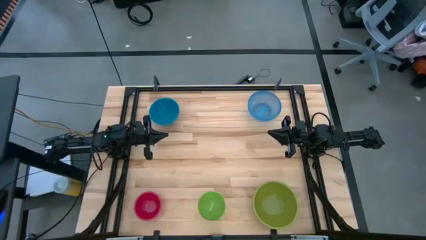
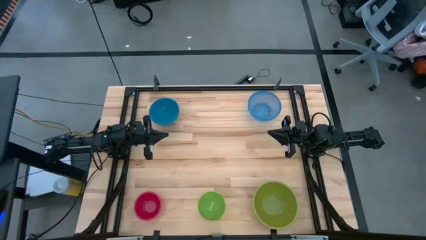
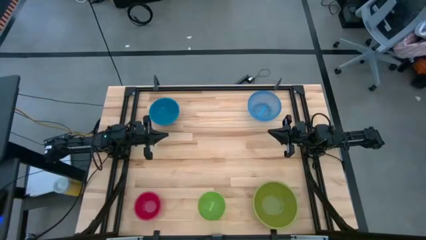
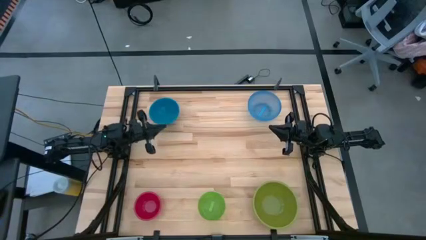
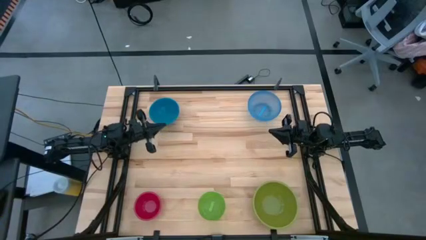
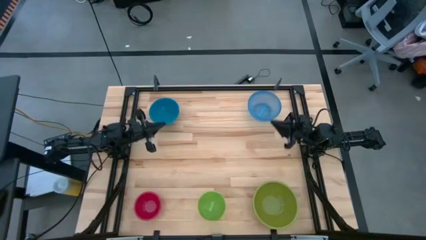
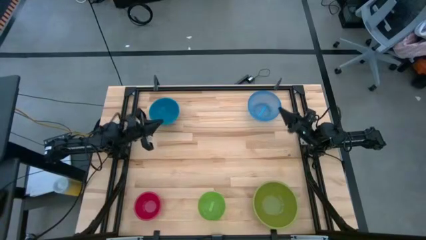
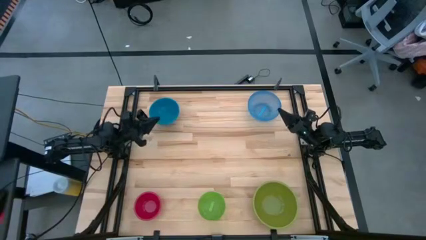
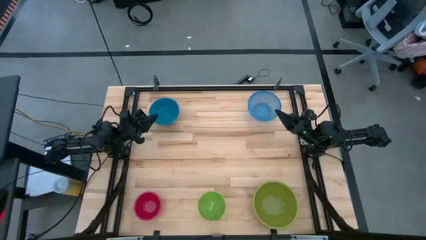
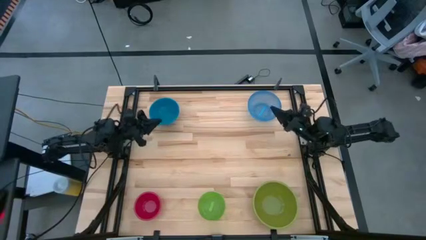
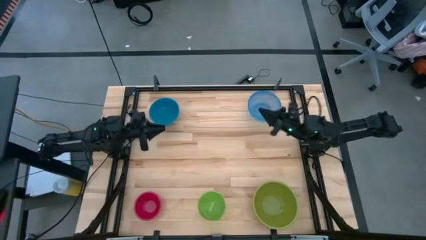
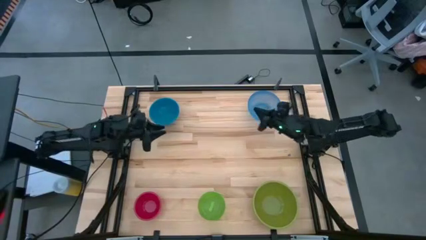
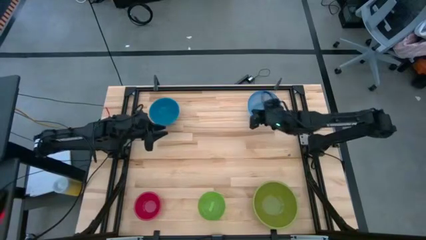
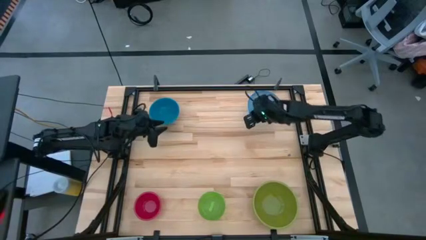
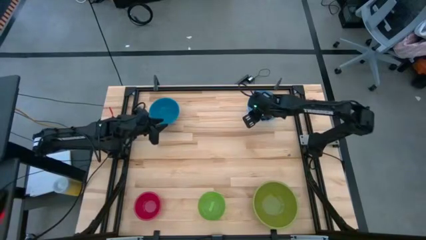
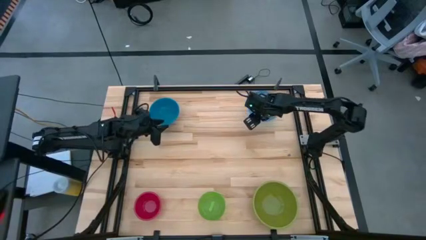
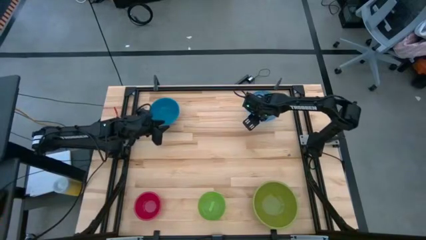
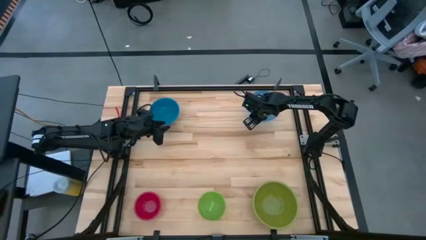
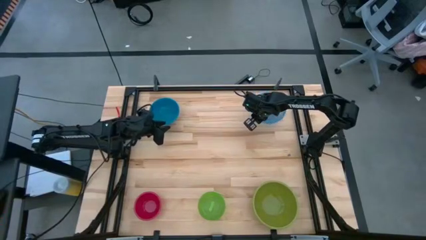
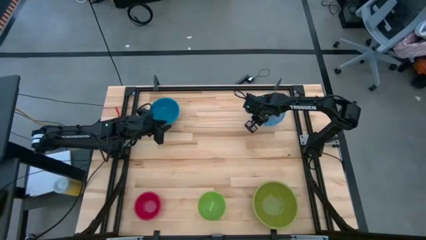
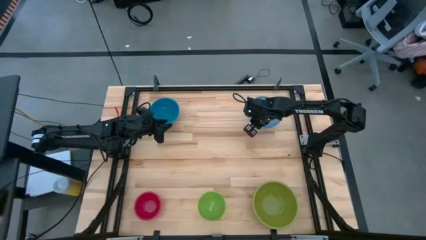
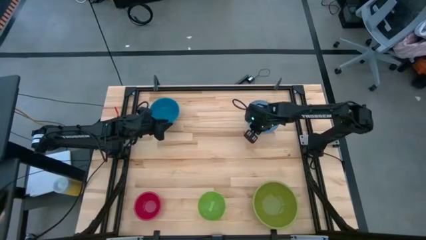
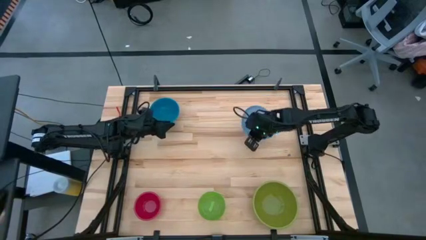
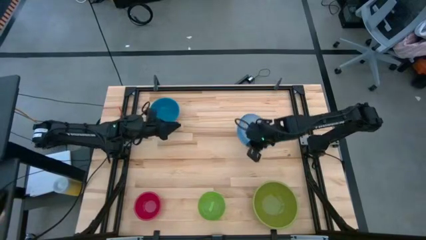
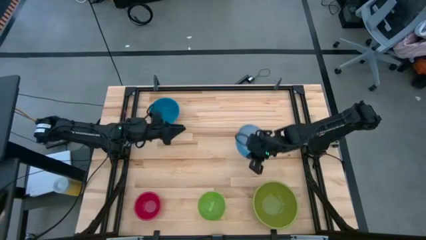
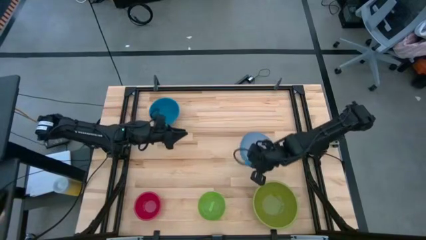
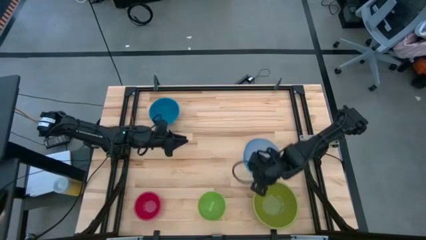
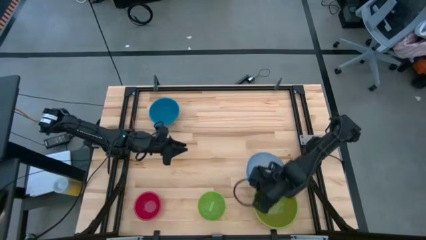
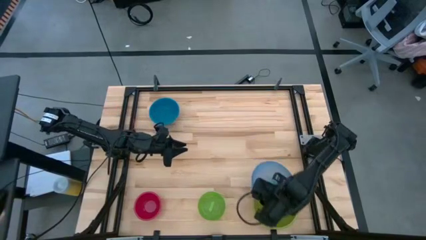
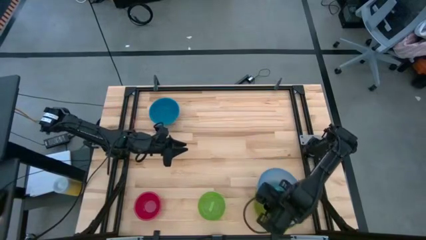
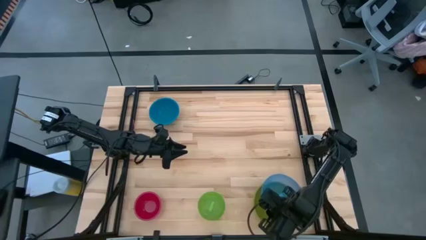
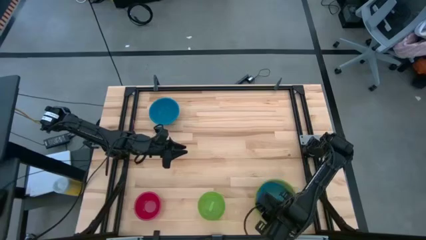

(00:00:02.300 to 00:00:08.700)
Stack the light blue bowl on top of the light green bowl

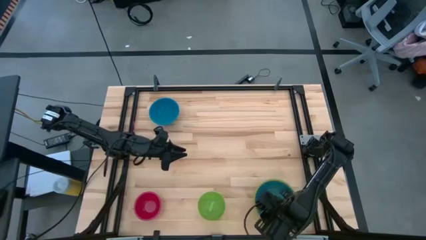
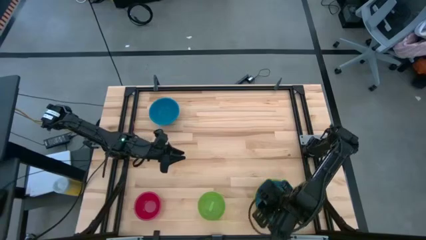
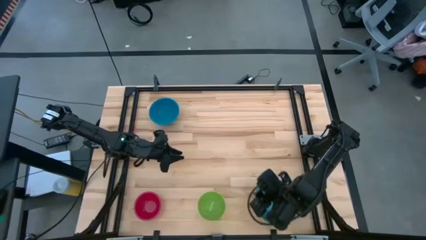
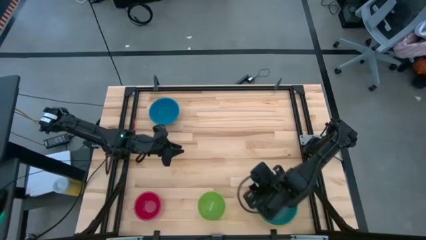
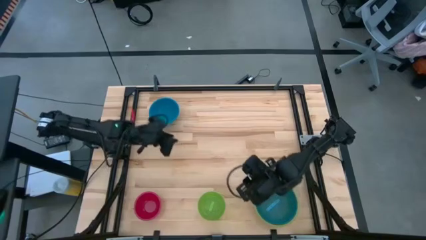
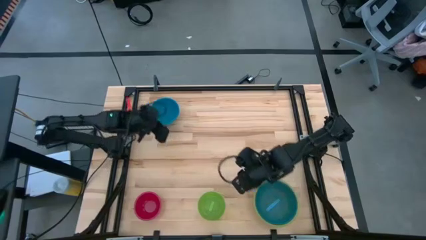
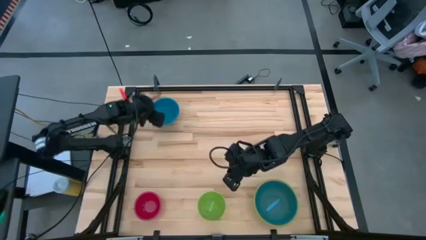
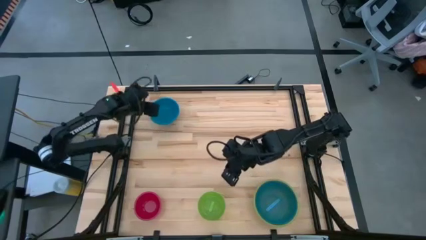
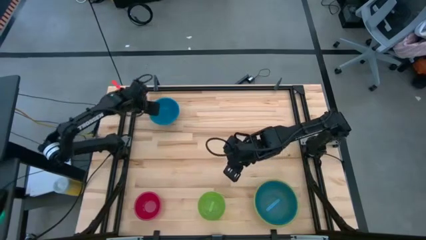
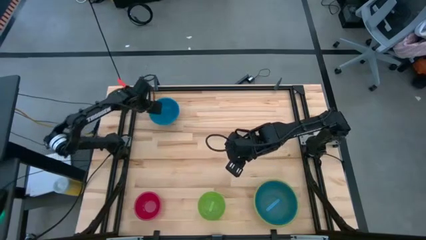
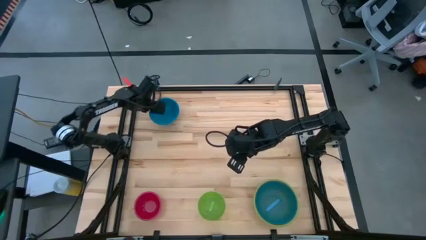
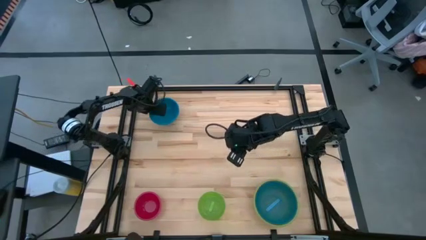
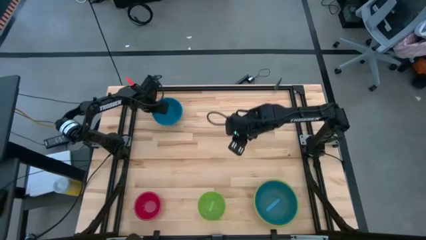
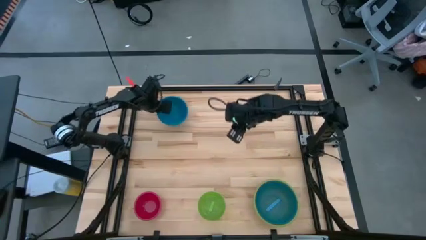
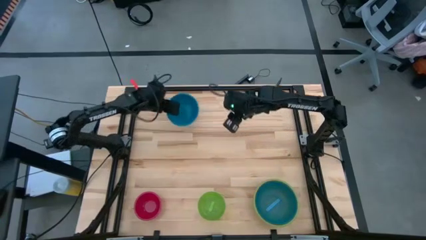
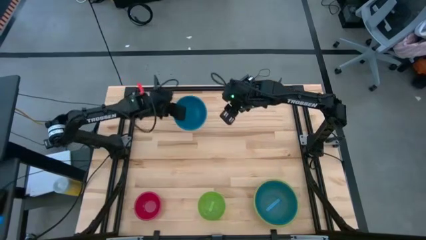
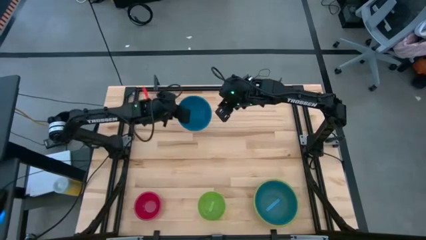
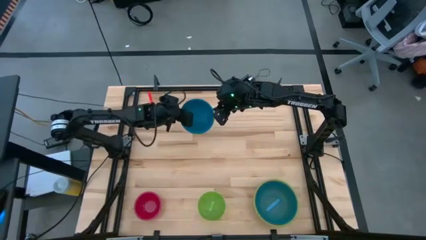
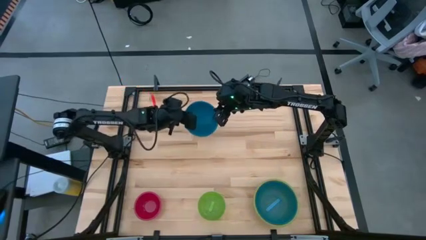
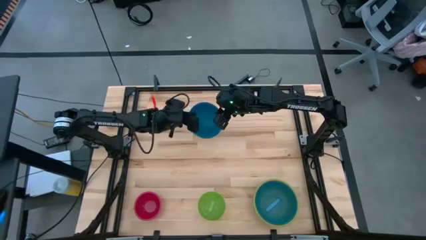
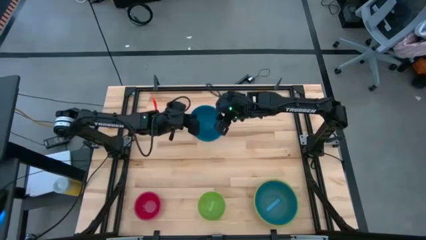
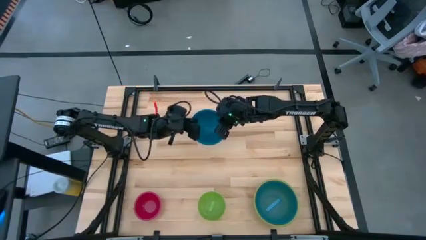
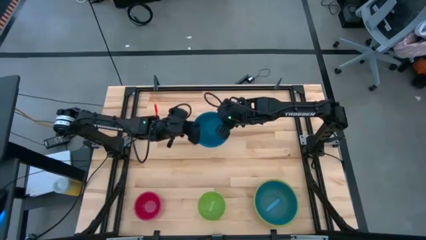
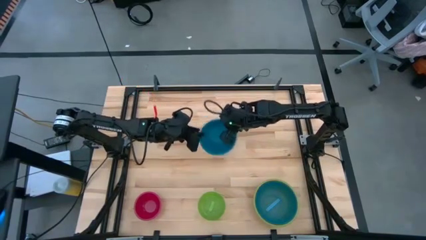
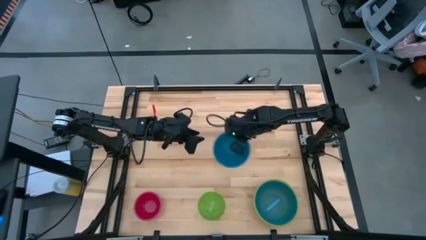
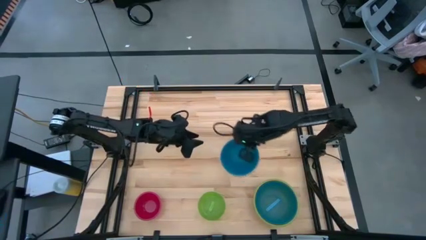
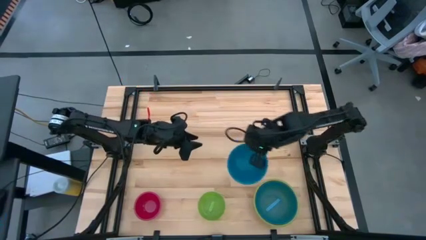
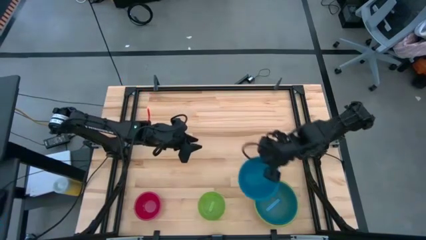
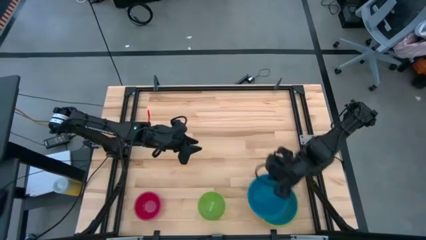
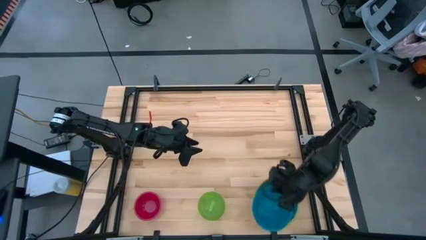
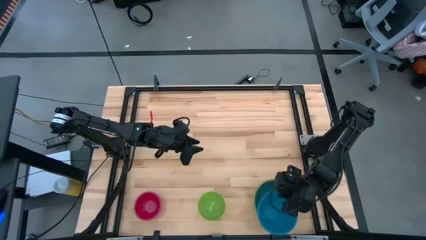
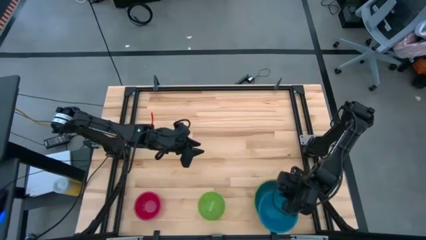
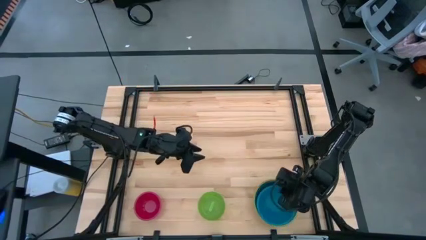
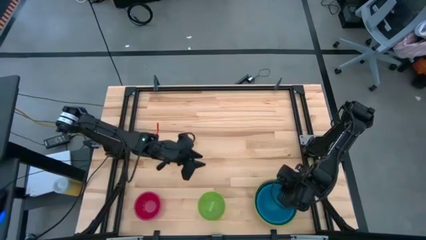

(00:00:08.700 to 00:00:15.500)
Stack the blue bowl on top of the light blue bowl

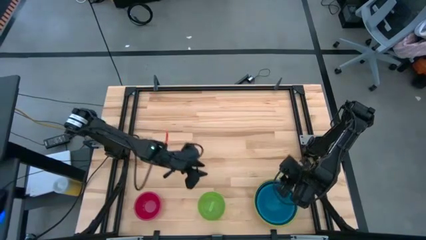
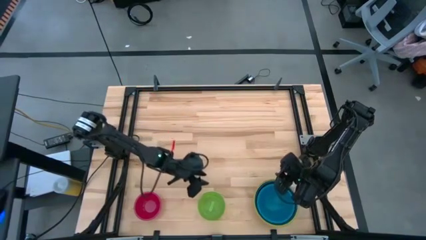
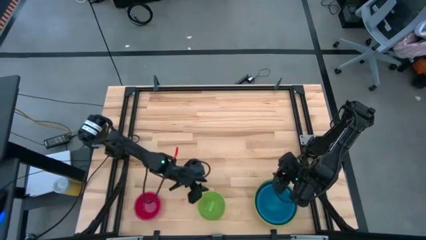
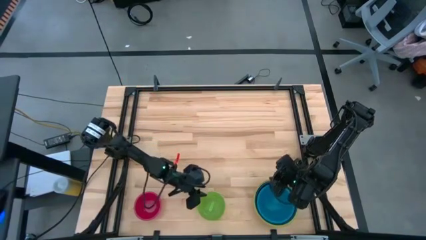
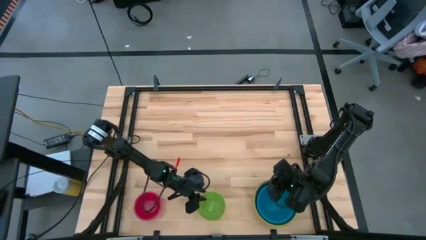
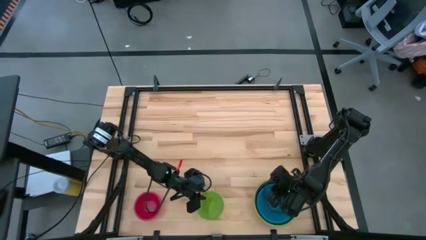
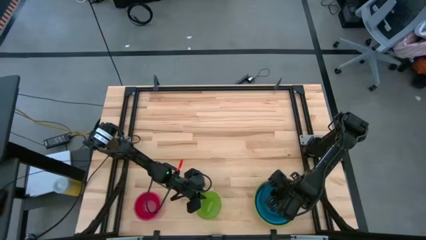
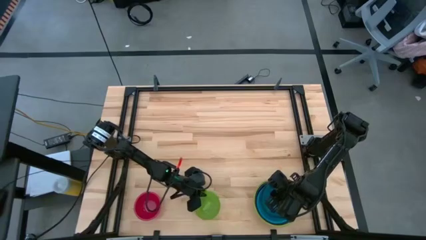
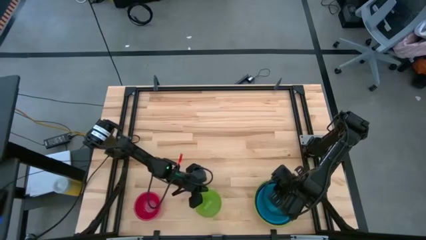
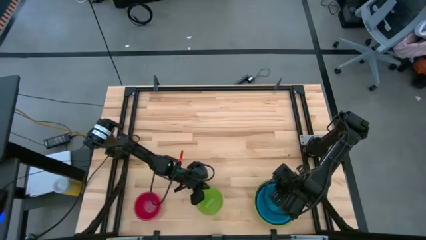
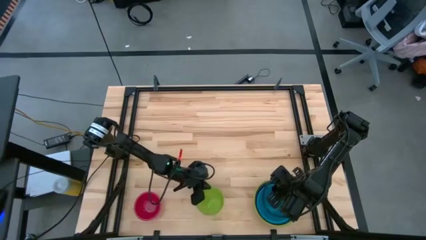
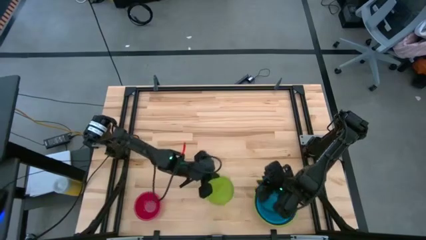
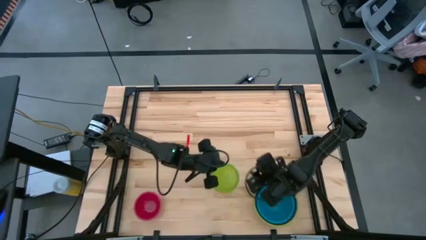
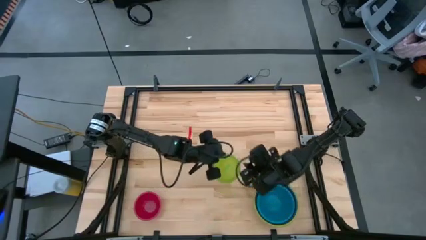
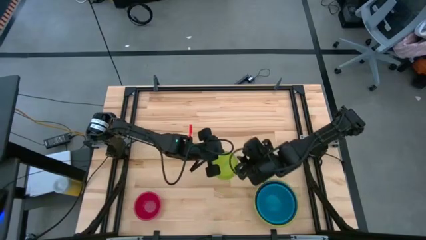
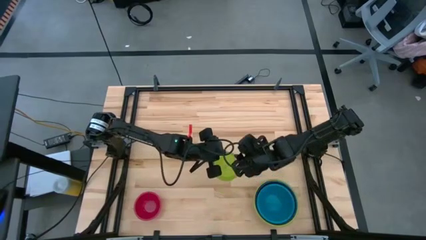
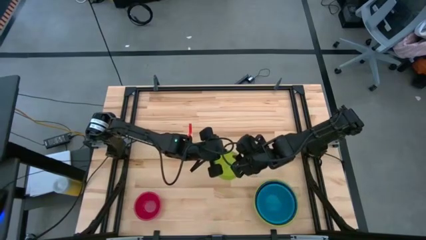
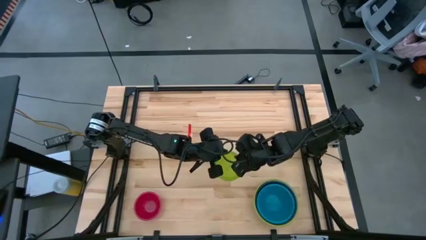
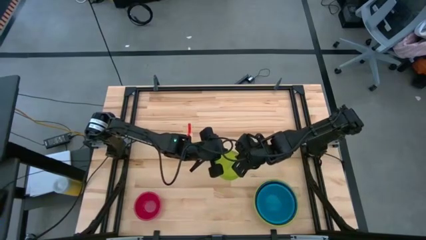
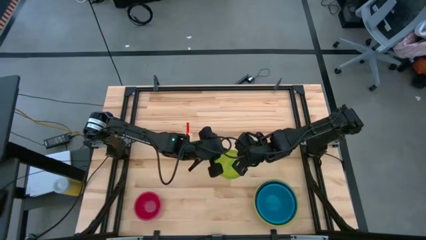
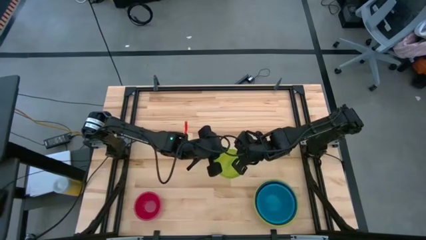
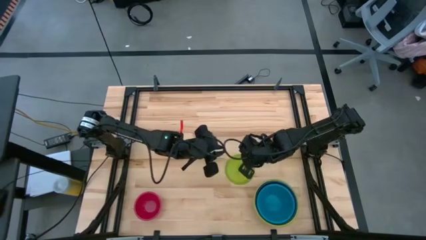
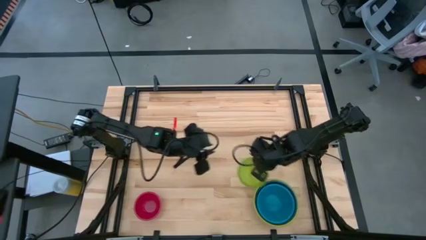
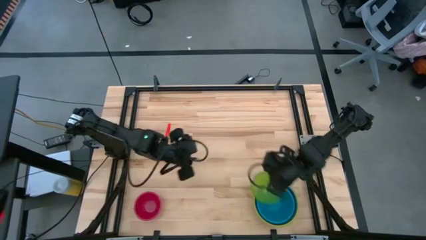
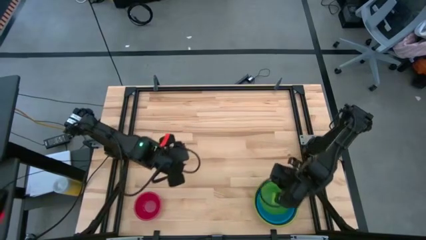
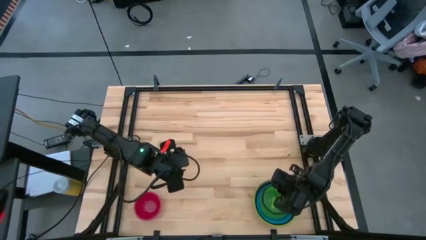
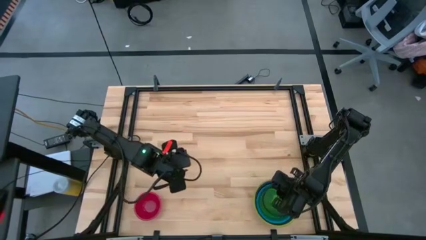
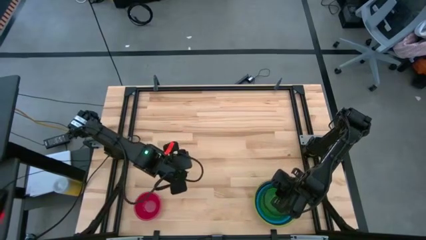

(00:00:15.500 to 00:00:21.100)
Stack the green bowl on top of the blue bowl
